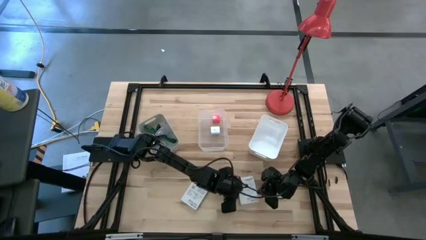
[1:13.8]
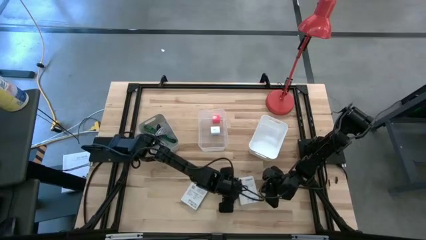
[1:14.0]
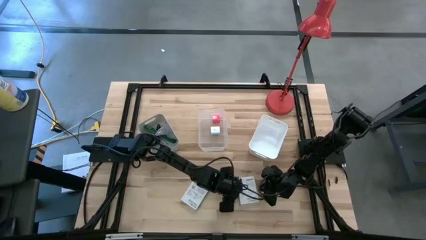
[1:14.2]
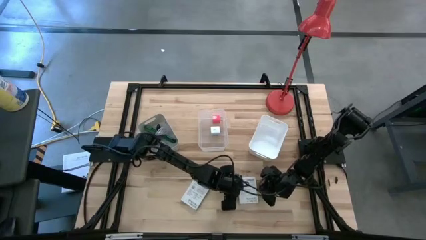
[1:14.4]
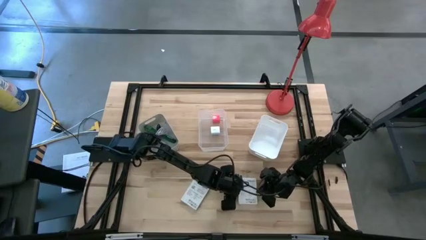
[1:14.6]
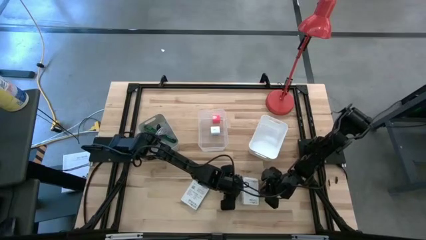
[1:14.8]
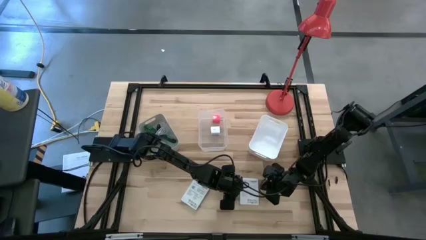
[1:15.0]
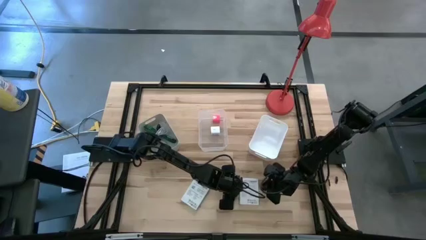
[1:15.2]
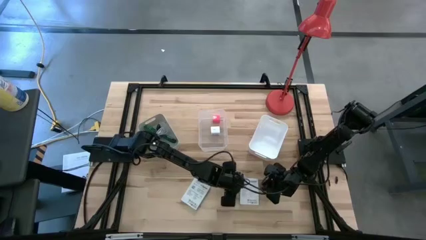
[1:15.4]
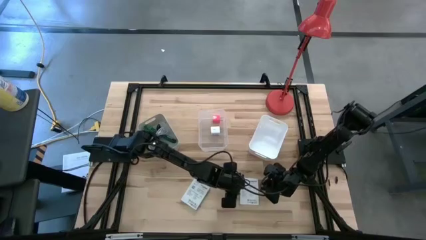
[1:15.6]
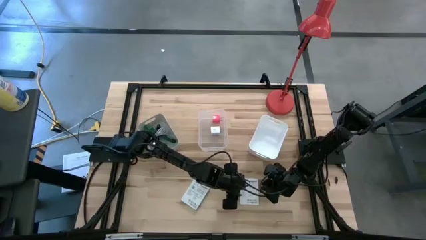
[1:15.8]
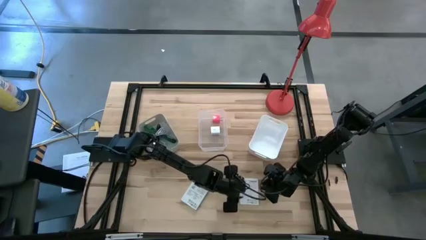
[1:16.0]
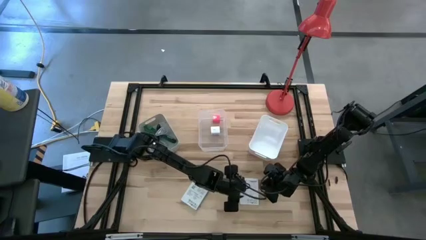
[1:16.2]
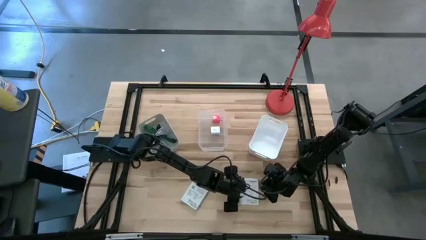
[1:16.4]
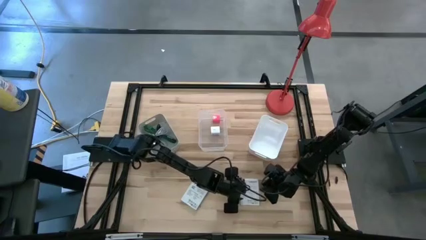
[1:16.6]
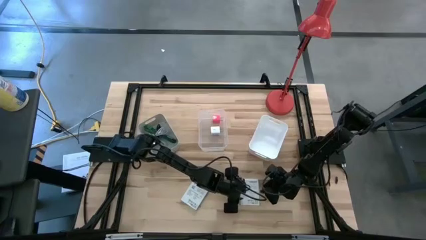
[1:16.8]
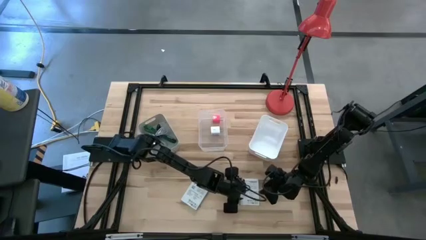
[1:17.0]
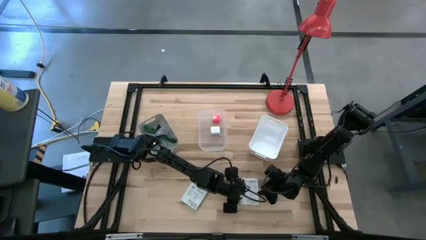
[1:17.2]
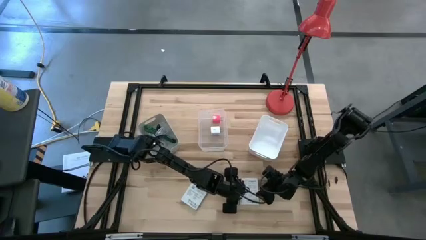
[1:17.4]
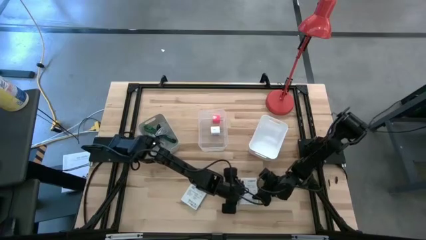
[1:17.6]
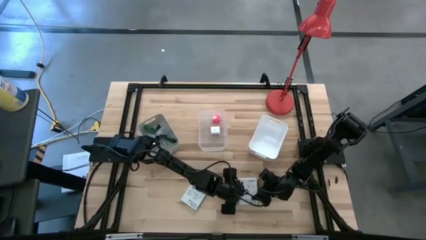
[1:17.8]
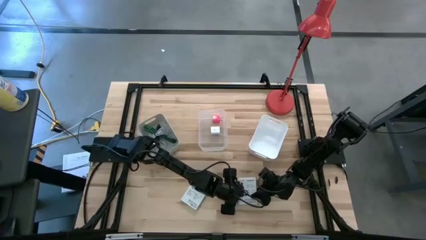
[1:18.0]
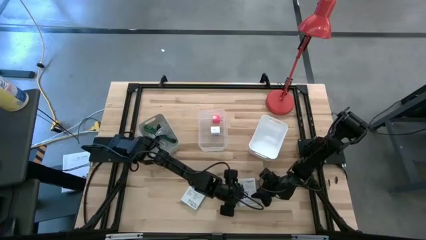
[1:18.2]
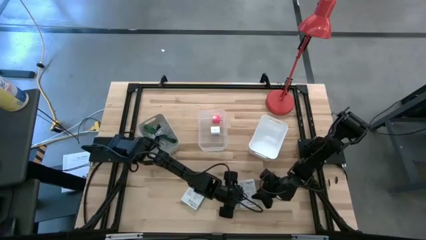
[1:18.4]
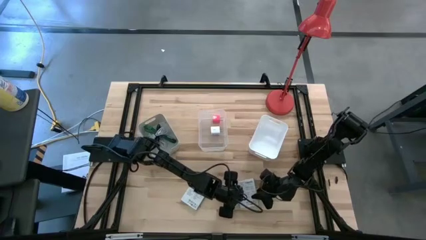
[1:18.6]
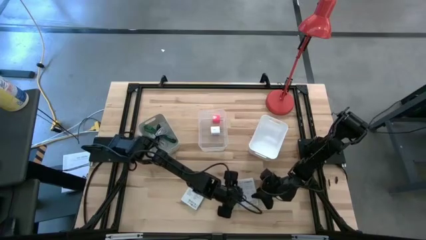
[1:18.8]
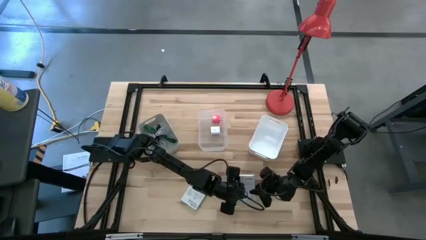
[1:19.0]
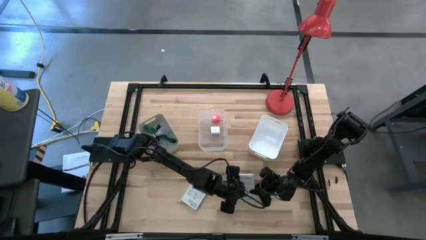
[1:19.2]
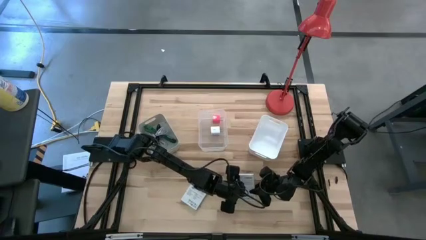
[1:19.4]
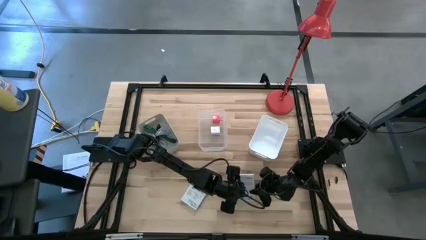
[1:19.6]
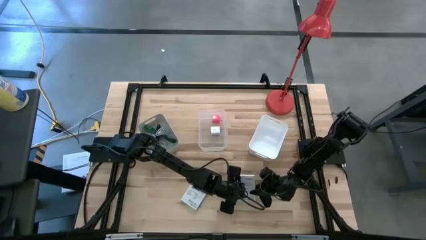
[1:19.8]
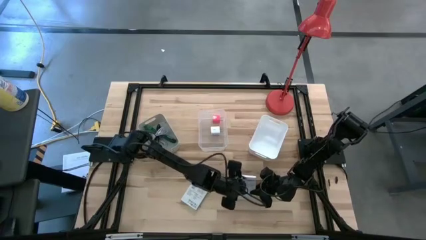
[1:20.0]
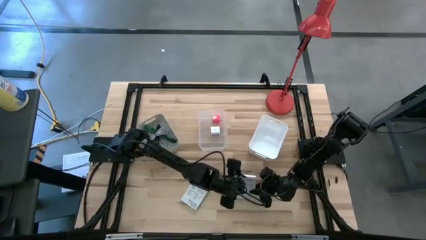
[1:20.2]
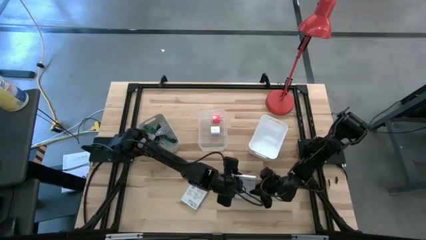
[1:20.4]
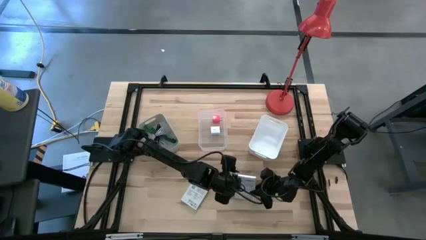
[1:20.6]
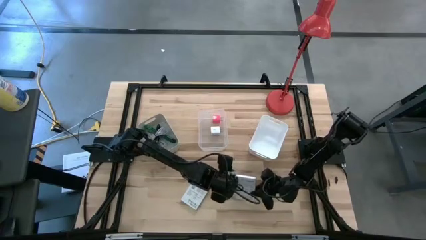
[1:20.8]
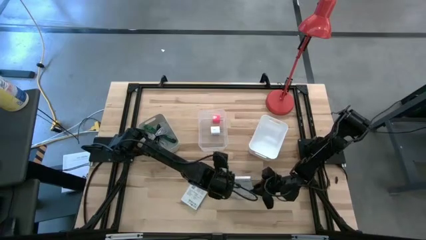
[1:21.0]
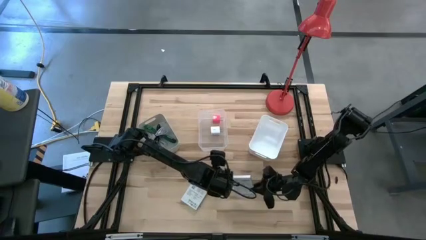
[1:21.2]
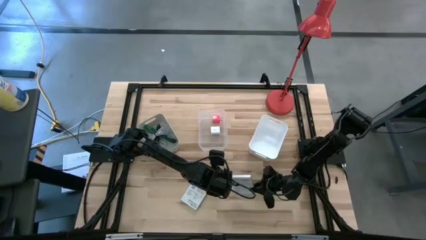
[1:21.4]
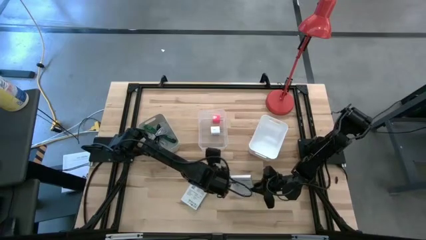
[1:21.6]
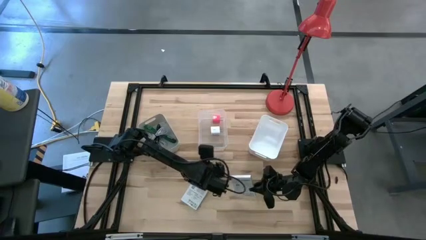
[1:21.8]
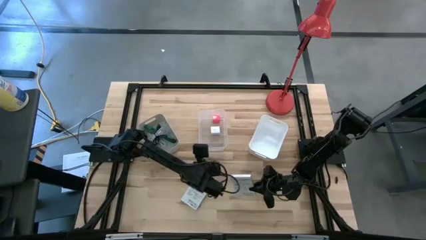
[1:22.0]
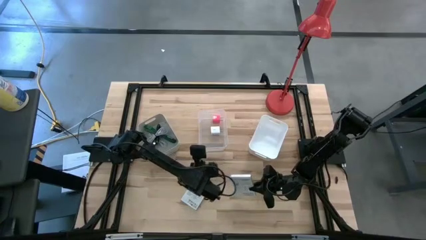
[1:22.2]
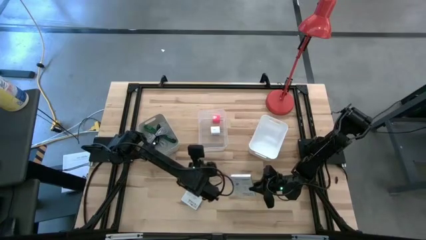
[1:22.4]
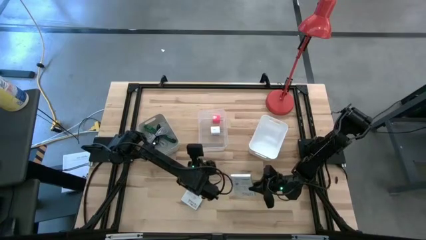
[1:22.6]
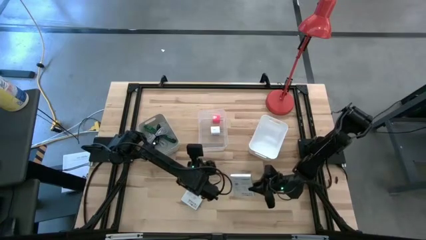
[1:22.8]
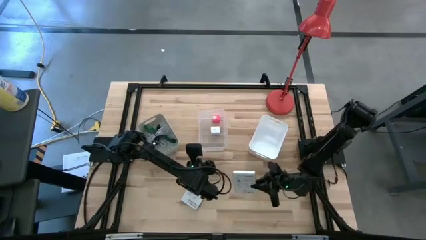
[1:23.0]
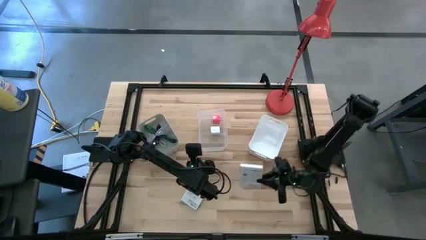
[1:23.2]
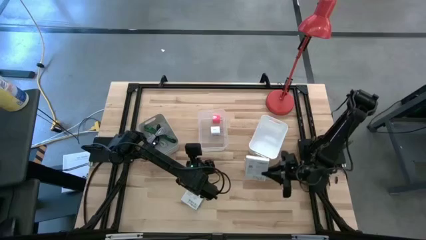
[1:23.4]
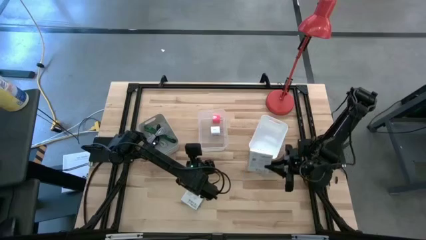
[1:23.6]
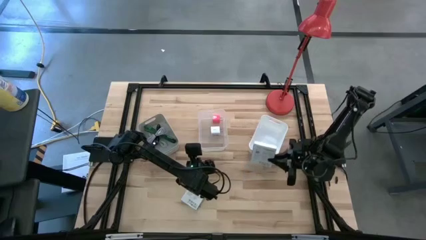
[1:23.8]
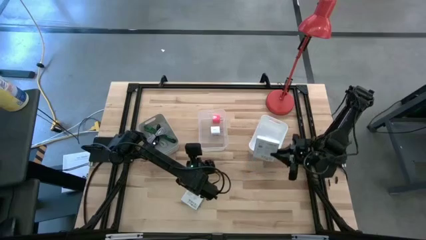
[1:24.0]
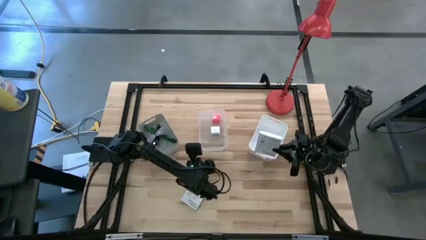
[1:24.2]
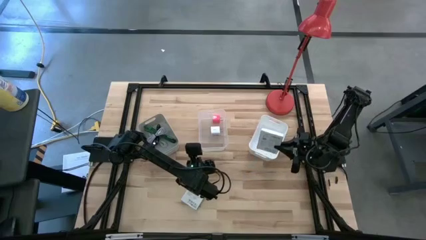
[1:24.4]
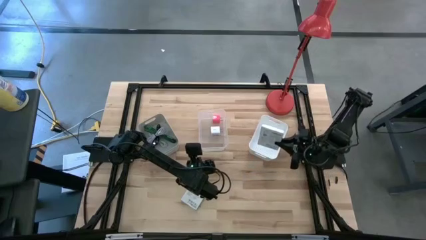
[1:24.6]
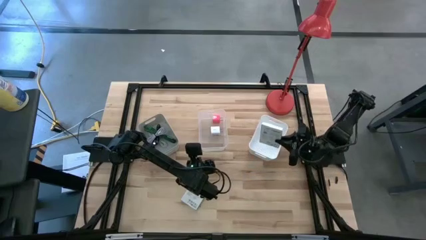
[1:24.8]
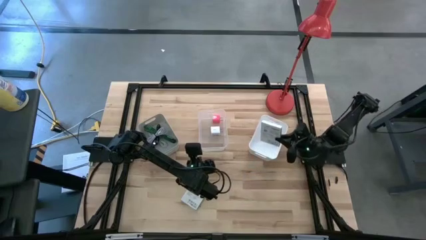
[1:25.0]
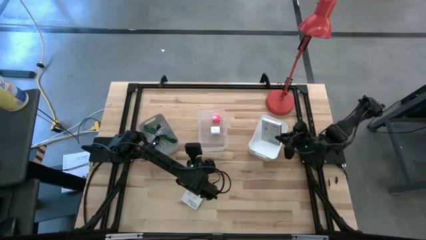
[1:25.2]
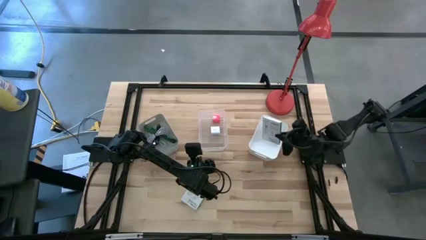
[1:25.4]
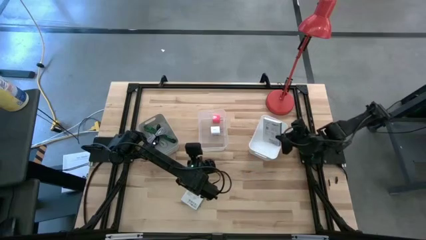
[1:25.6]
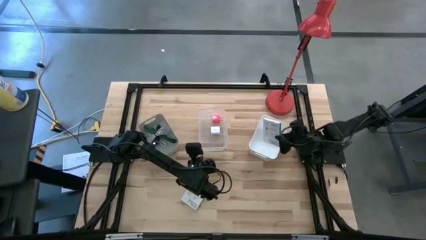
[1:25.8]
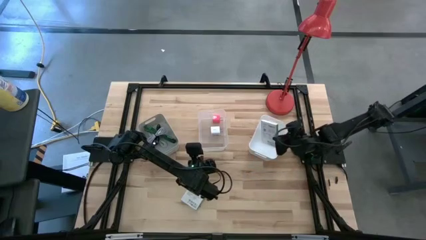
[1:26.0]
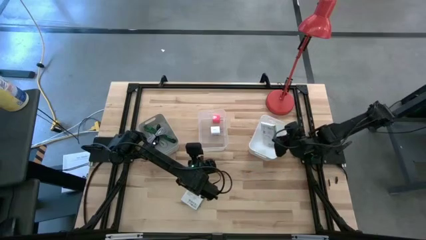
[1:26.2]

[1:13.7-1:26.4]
Task: Pick and place items into bin
Put the right card reader box into the white bin

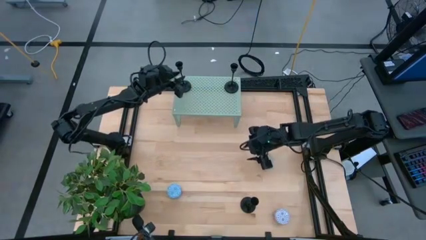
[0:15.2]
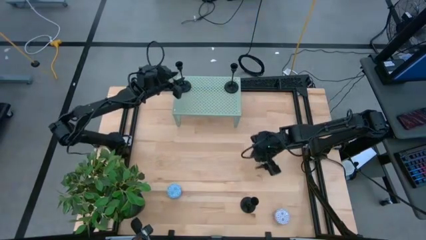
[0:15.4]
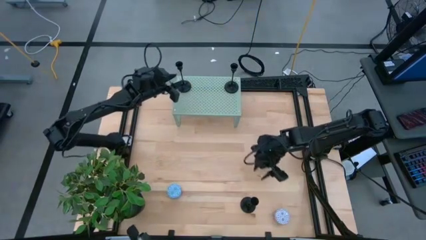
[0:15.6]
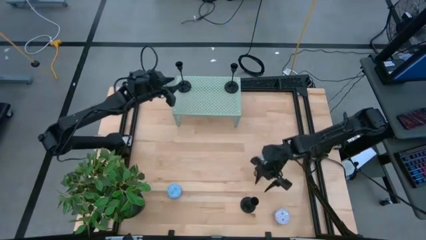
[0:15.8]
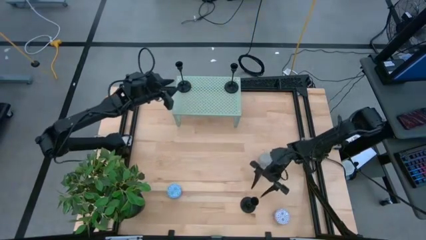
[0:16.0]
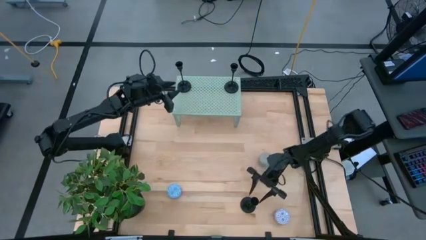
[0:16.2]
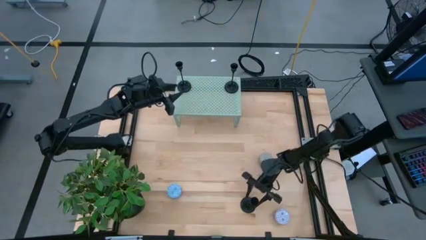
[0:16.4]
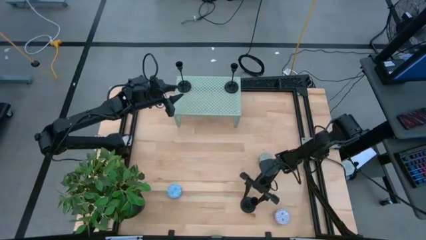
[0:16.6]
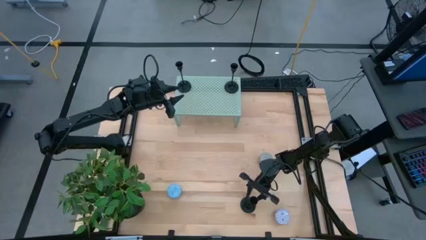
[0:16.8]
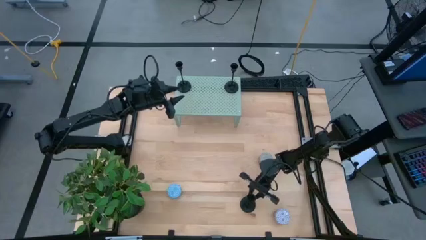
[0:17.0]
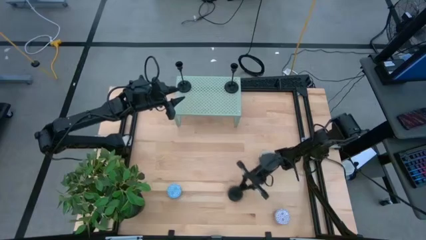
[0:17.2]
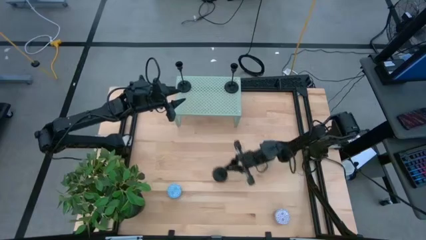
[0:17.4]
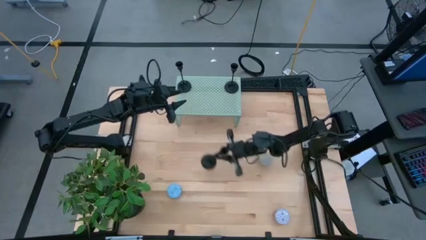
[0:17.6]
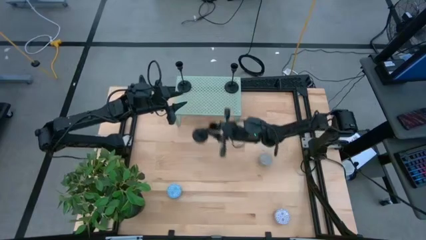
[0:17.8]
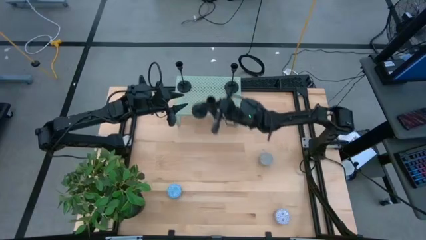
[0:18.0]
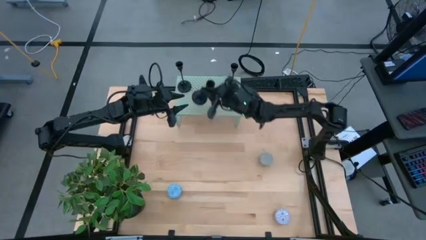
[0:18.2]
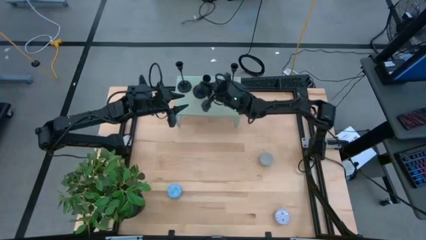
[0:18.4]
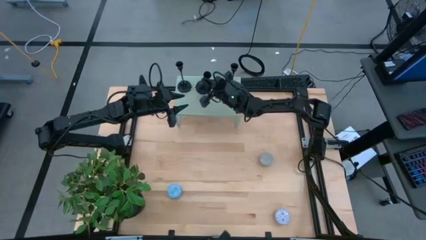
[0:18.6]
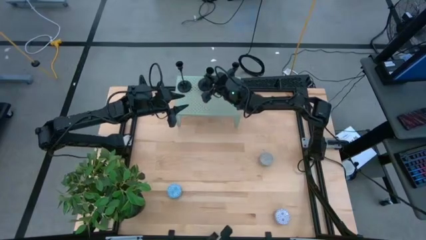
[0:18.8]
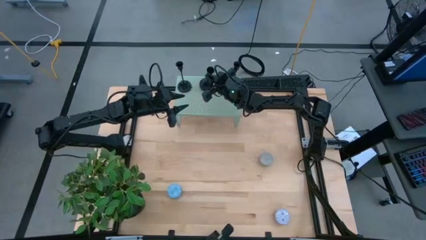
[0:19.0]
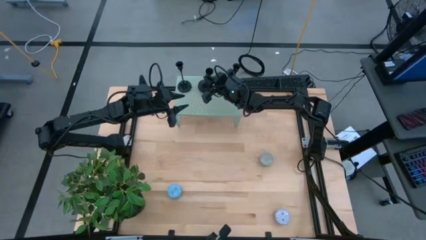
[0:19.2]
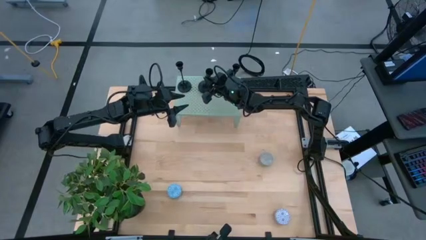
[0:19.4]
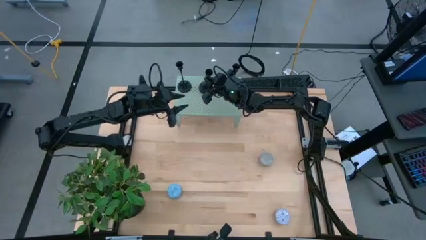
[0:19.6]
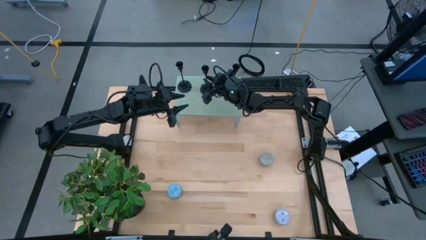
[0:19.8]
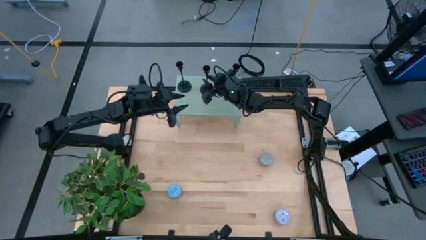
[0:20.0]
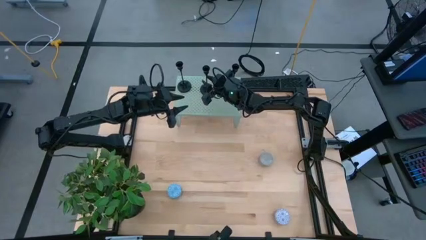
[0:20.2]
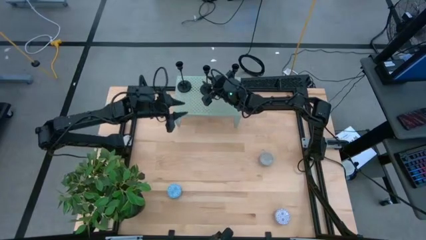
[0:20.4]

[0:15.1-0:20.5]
Task: Pick & Place candle stick holders
Put the black candle holder on the shelf
